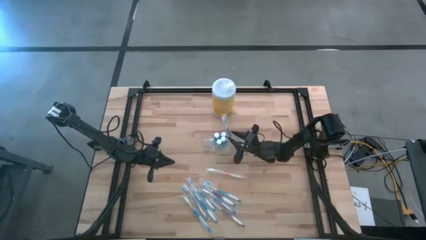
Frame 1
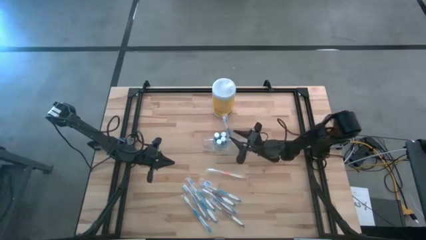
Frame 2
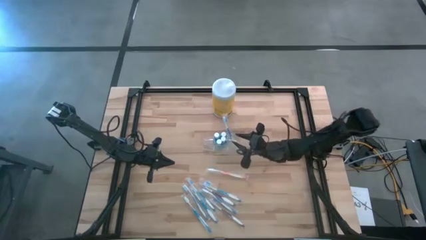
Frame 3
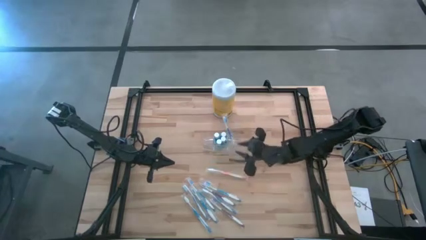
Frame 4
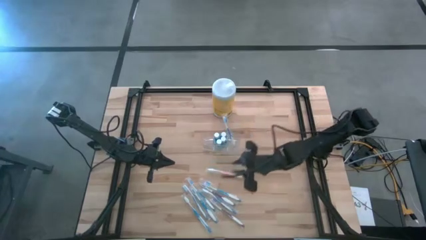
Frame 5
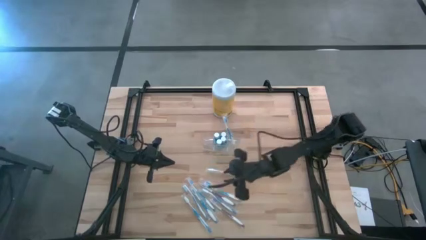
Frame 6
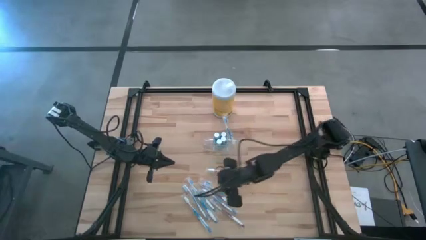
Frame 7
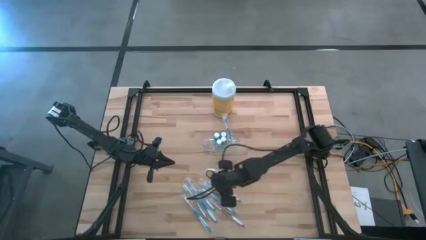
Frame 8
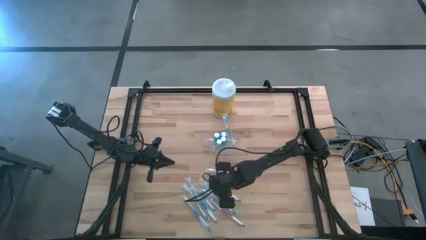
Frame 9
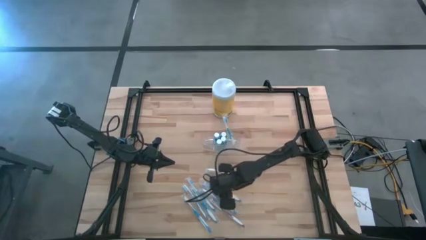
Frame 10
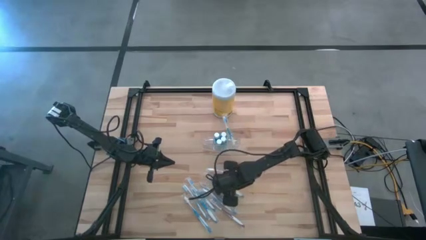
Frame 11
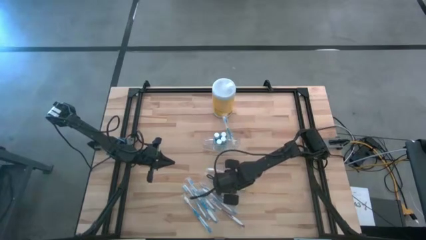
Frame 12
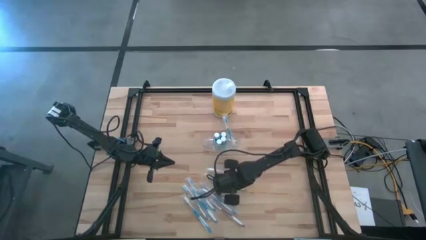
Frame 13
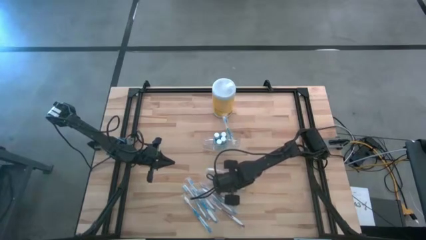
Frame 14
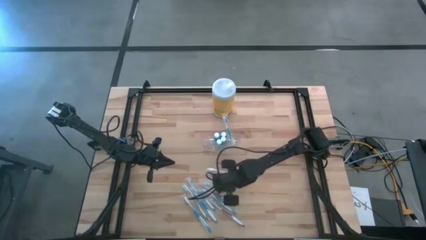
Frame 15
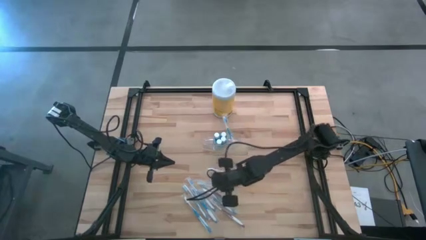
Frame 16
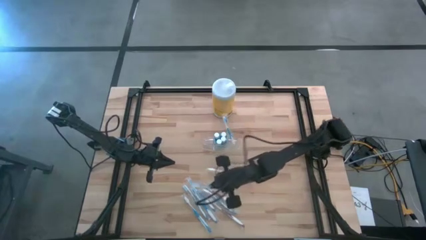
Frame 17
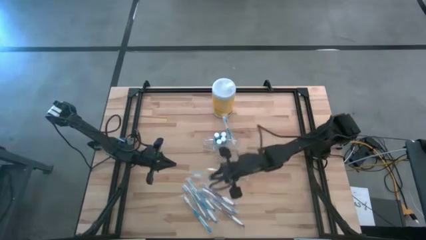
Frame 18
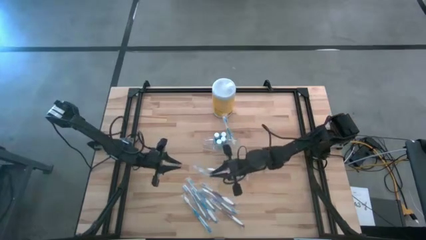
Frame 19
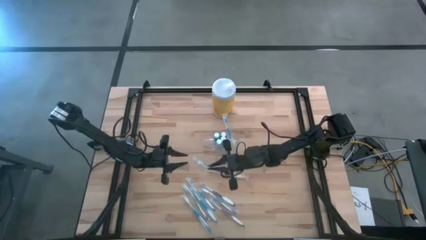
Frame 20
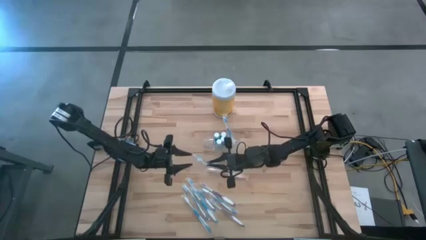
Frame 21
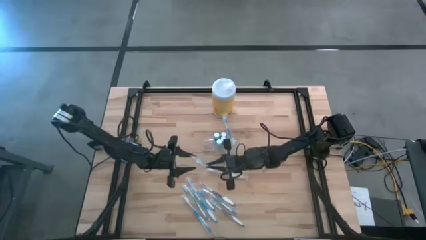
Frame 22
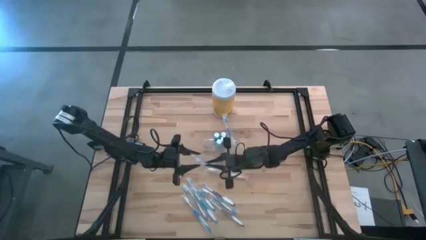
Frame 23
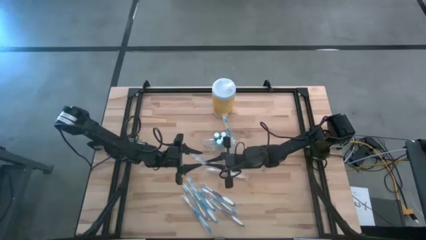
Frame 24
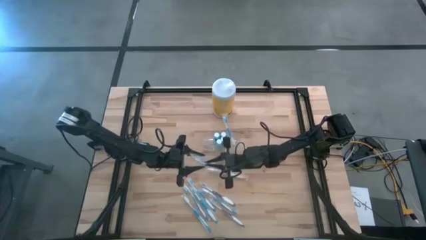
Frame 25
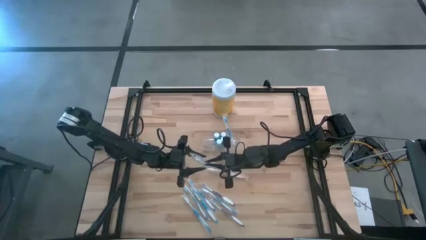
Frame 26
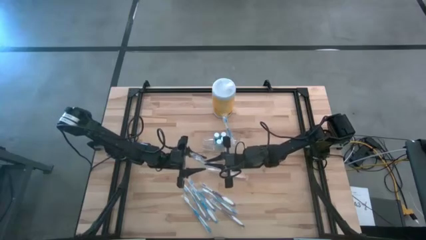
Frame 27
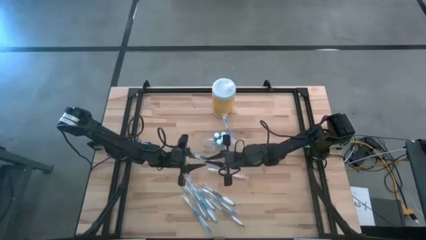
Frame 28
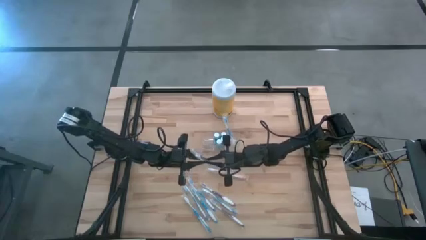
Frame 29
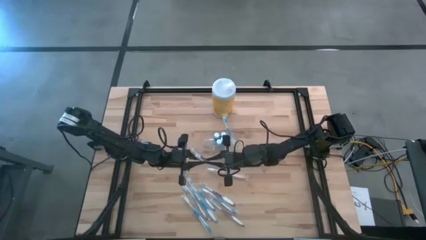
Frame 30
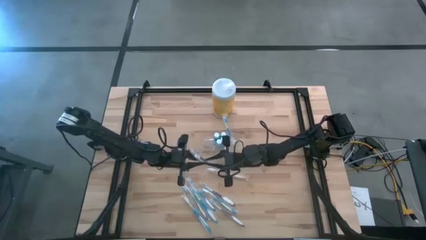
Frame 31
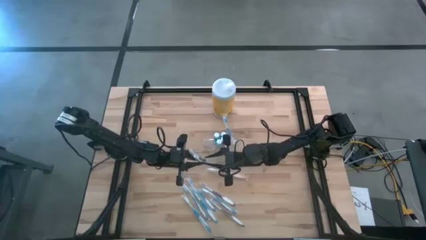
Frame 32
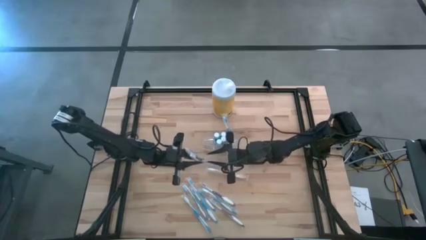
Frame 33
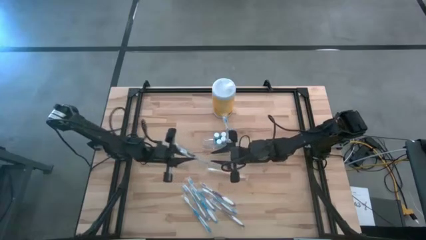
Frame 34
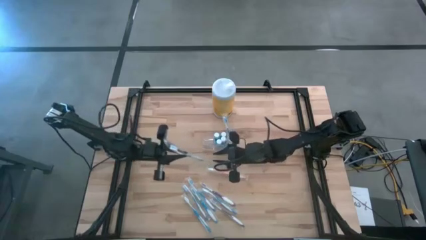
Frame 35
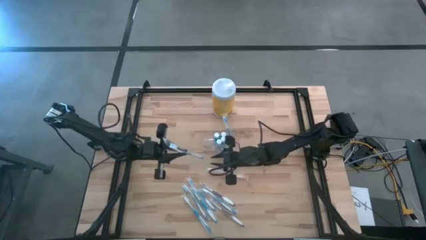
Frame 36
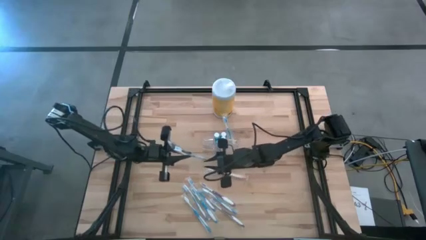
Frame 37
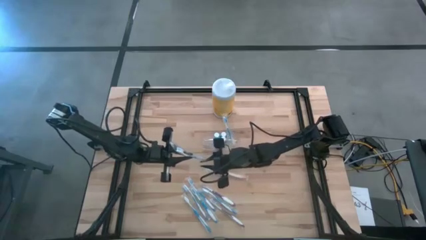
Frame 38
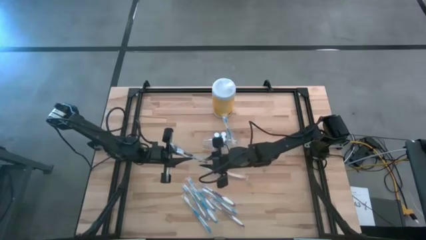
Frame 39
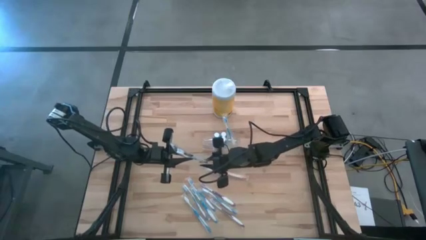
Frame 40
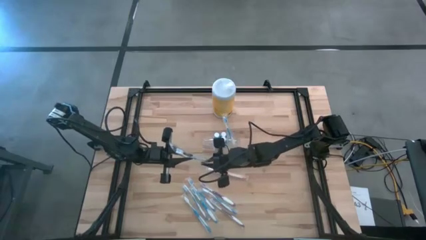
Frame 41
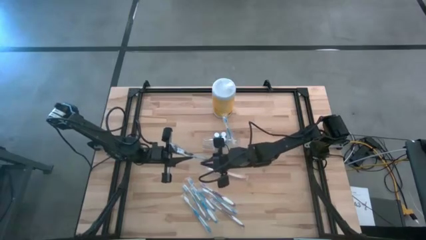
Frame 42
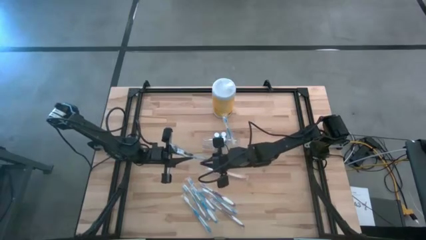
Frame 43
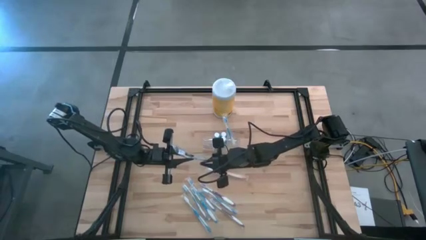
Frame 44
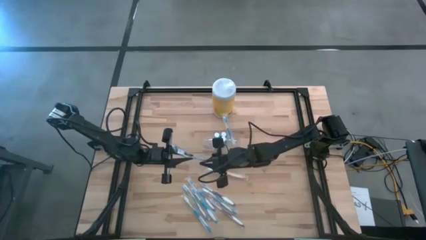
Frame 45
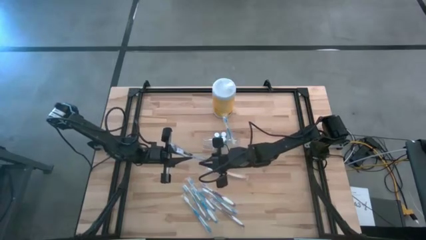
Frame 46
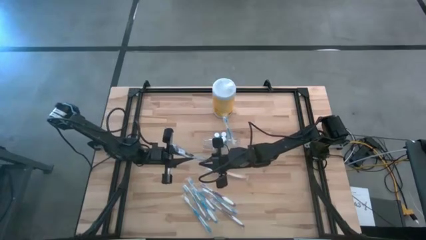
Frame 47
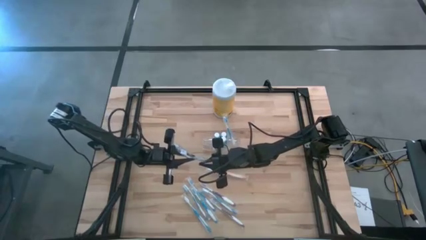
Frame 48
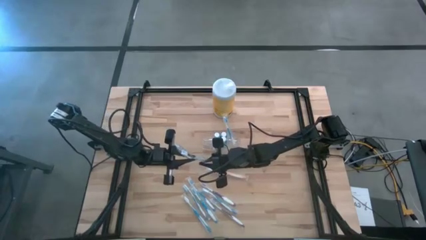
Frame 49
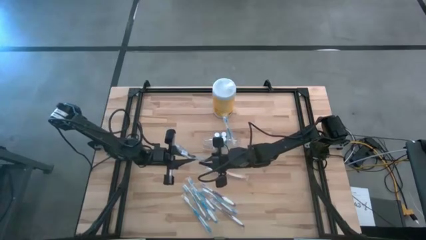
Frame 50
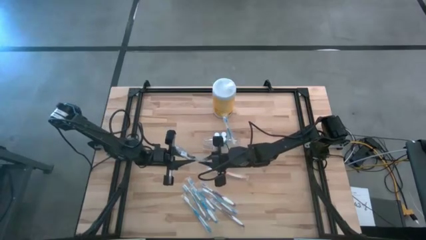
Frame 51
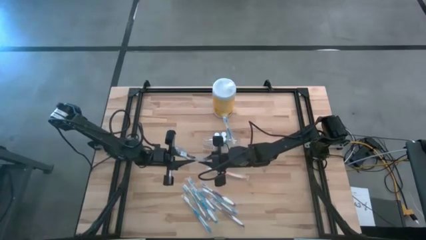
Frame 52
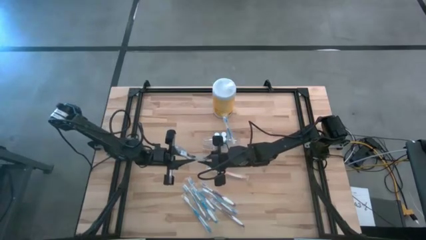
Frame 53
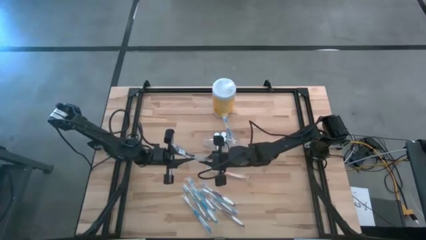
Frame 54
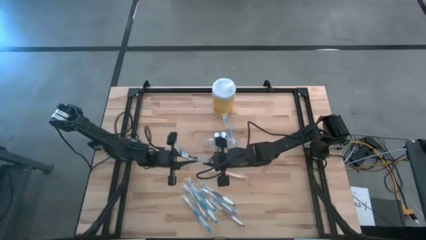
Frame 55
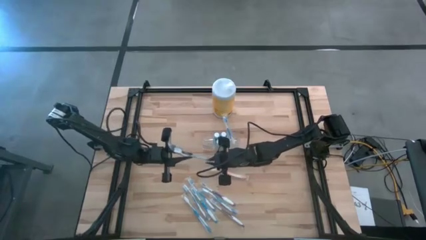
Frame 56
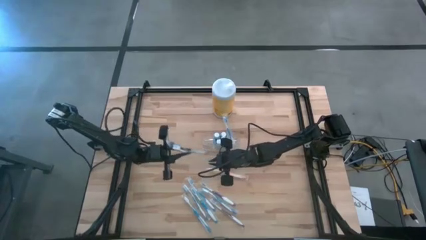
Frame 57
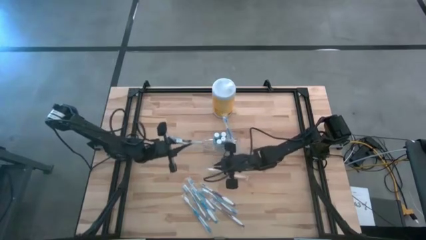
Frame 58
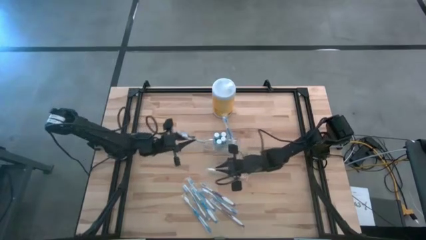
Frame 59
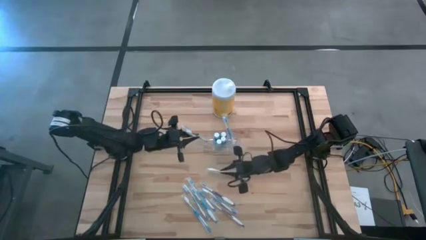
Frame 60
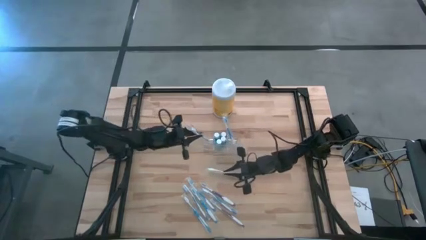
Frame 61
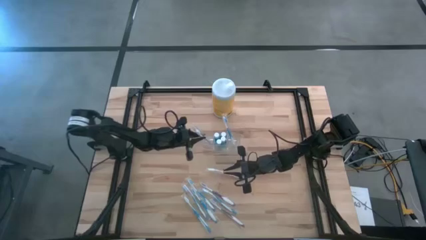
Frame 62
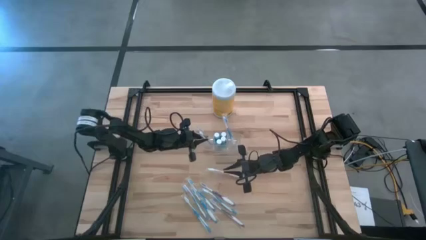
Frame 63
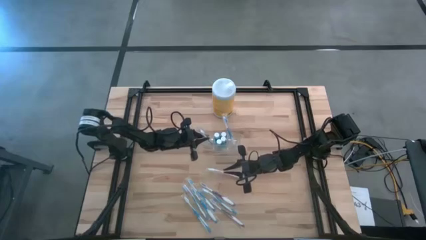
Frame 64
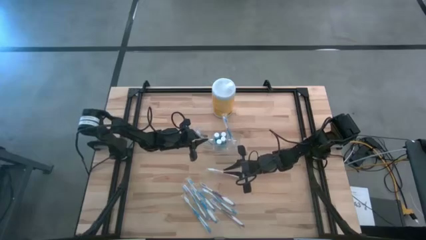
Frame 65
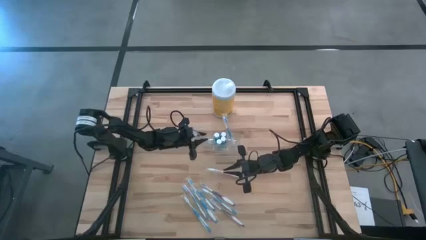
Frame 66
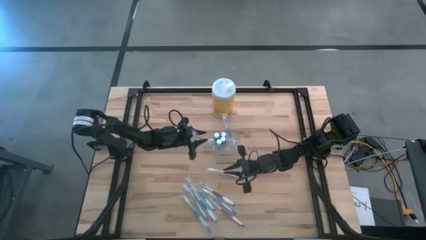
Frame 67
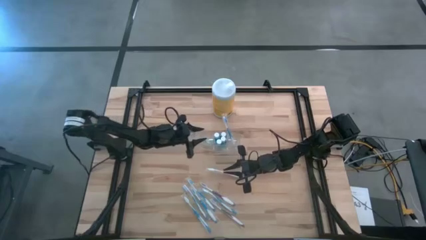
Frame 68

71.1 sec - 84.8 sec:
Task: Pick & Place toothbrushing station
Put the blue toothbrush into the transparent organizer
